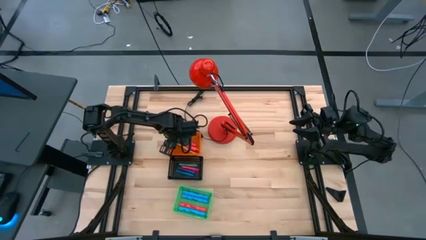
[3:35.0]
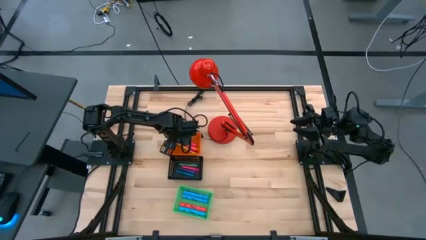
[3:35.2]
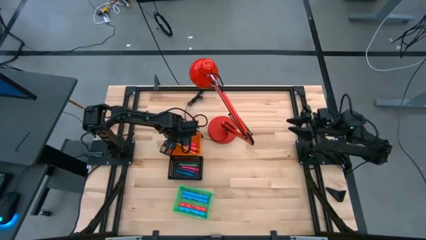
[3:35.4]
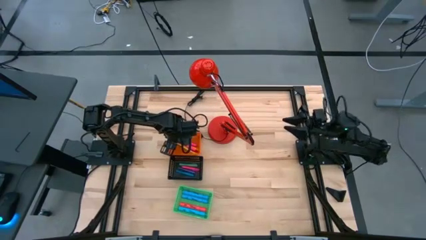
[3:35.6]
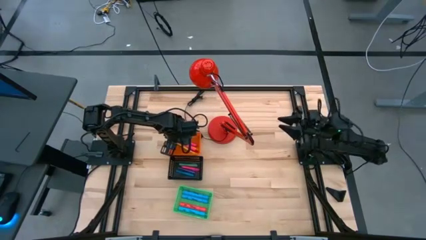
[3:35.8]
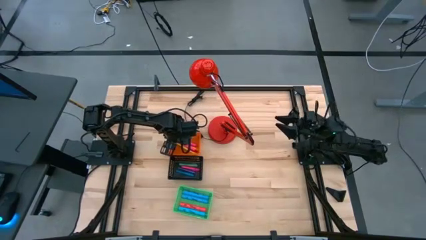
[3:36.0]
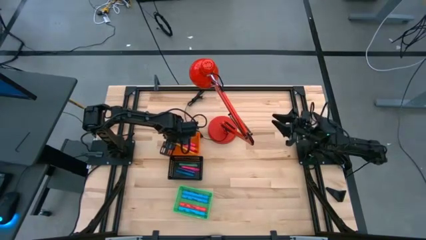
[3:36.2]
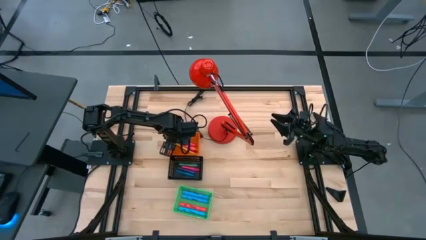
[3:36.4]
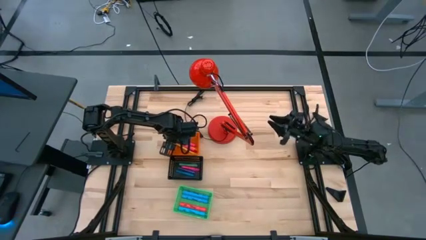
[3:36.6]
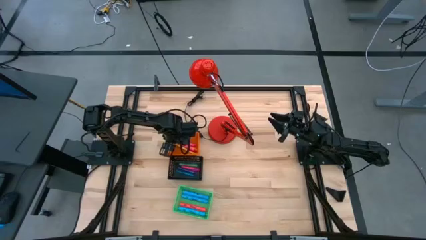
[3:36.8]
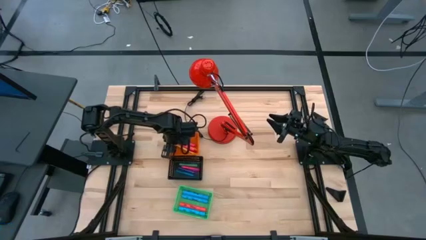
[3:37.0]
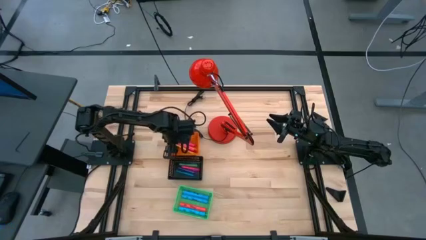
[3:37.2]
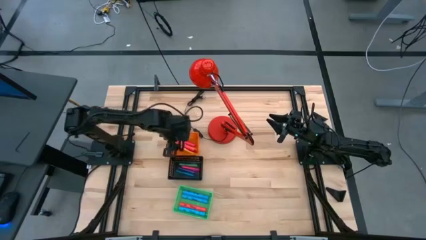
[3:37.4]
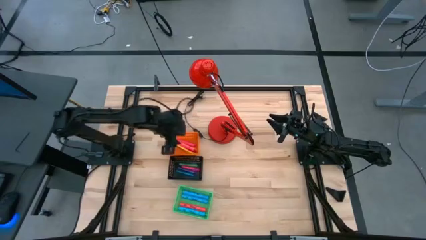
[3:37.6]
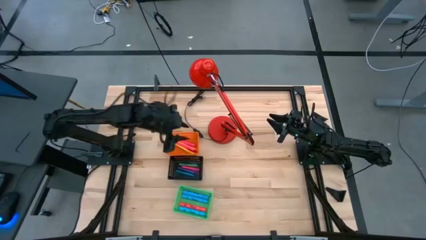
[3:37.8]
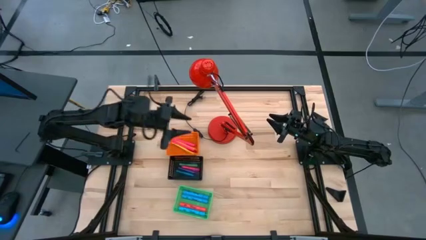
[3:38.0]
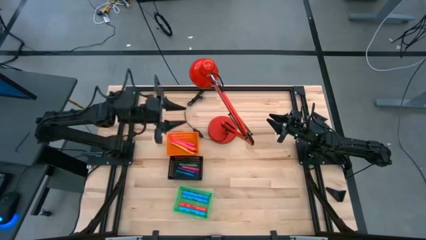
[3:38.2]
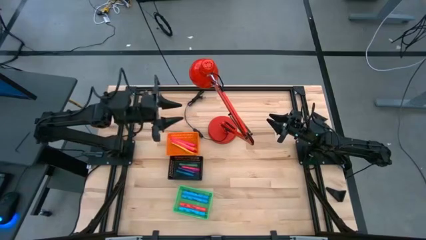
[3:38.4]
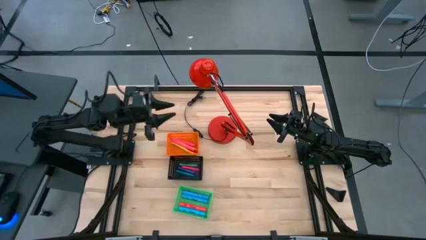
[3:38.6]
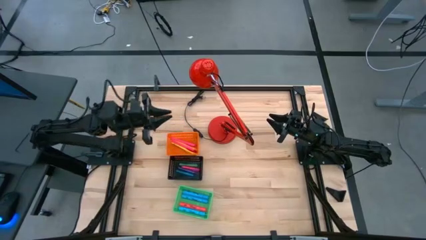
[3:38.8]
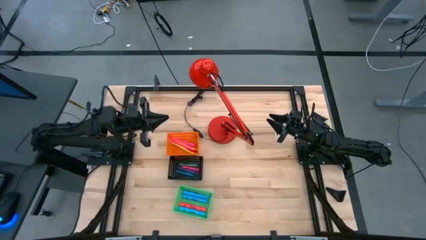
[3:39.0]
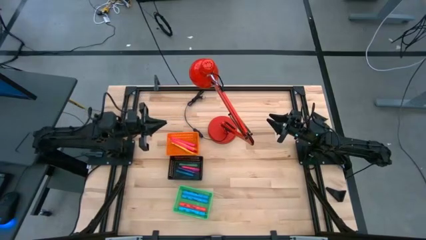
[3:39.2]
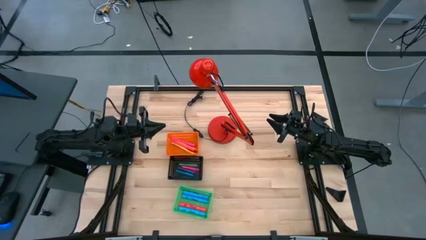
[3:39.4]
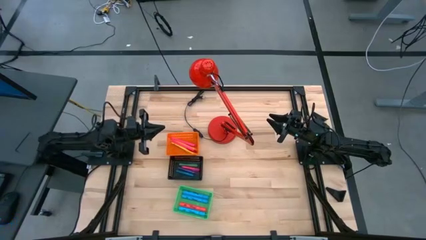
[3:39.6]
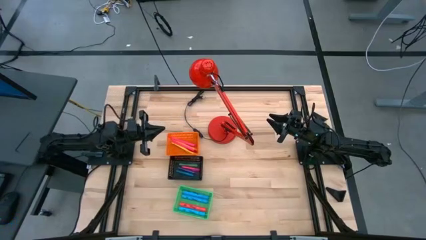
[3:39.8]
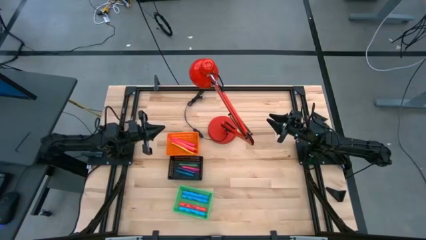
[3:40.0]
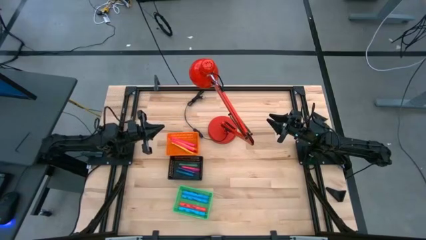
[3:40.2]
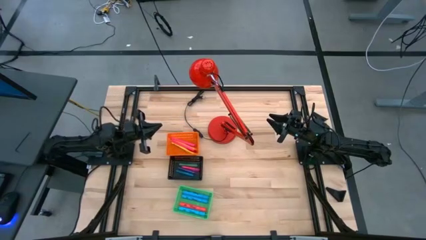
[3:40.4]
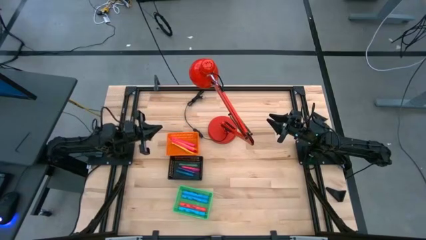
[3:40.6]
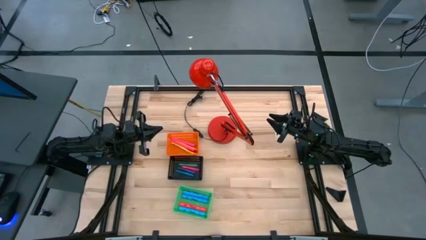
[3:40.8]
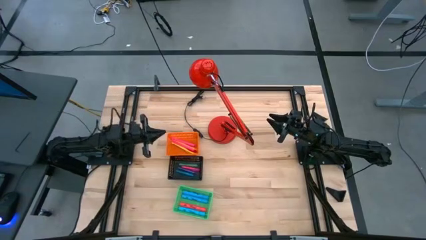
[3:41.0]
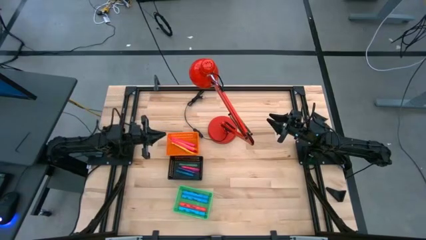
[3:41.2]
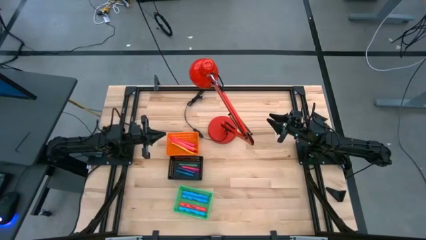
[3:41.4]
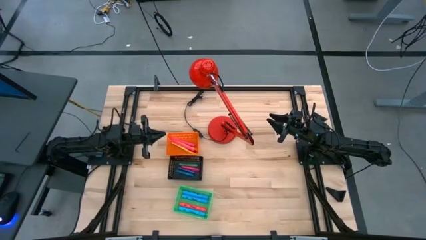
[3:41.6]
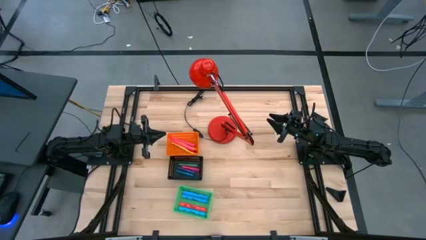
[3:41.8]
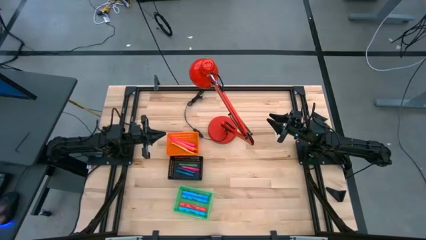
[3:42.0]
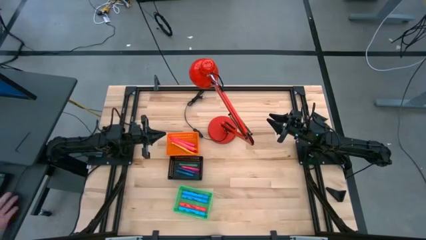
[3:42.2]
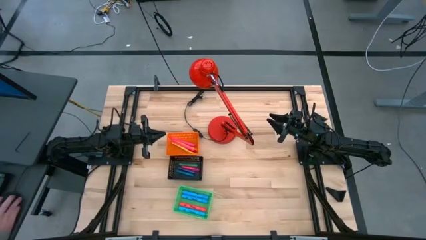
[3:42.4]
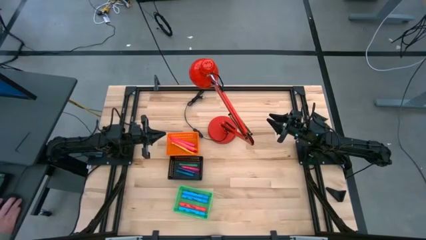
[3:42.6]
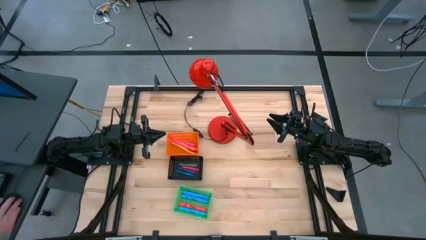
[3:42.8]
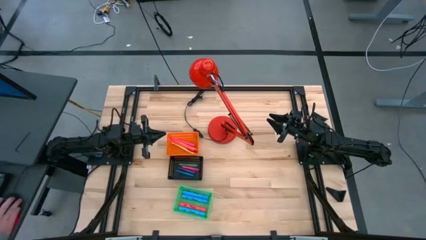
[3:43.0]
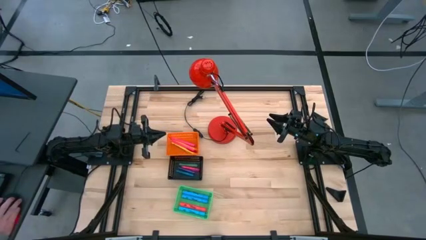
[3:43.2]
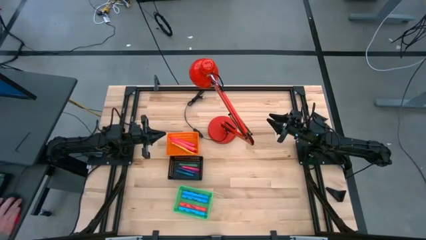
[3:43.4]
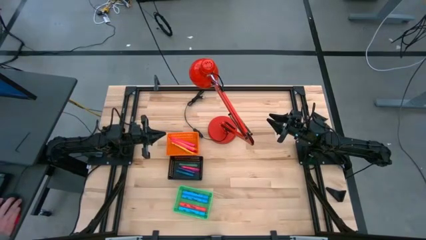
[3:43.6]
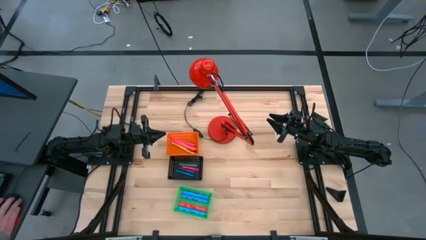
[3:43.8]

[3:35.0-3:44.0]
Task: Pick & Place Markers
Return to Home Position

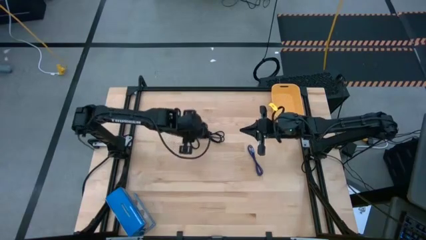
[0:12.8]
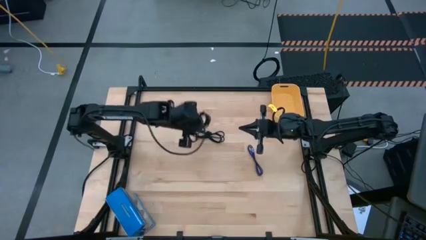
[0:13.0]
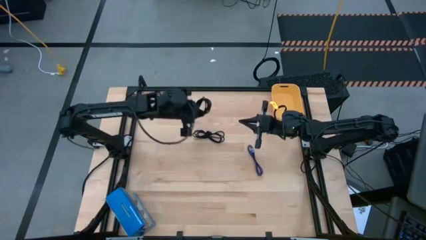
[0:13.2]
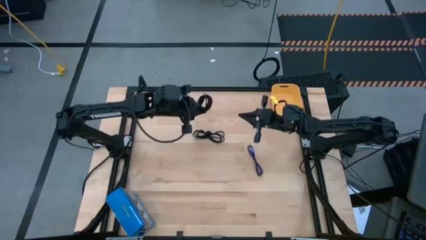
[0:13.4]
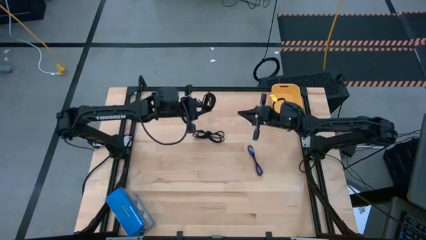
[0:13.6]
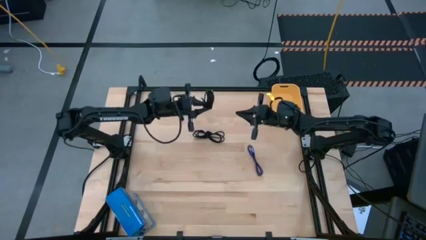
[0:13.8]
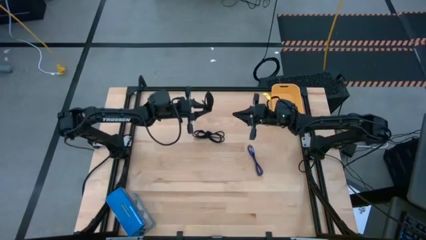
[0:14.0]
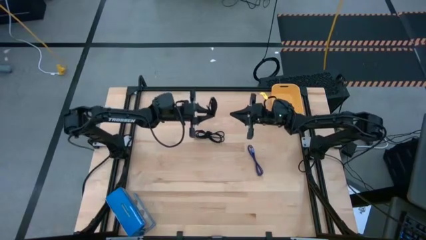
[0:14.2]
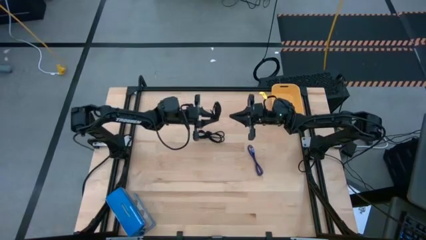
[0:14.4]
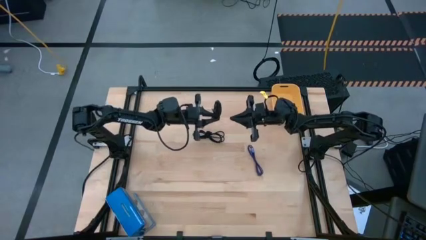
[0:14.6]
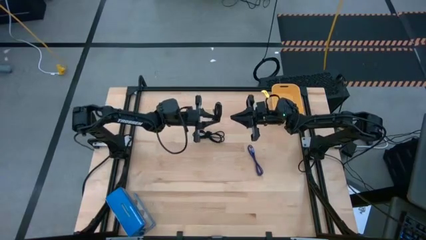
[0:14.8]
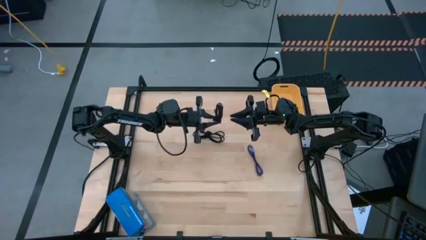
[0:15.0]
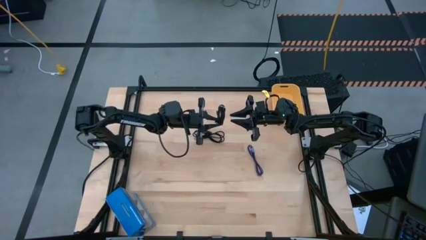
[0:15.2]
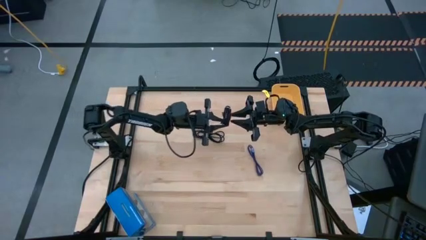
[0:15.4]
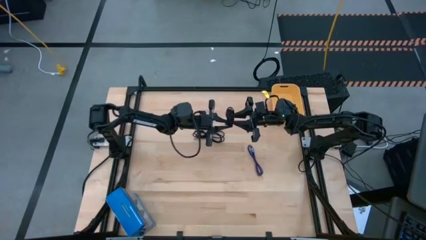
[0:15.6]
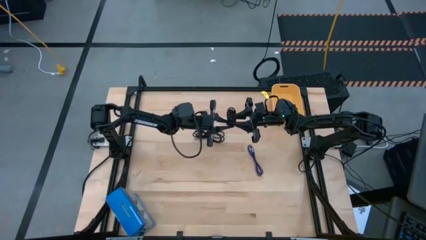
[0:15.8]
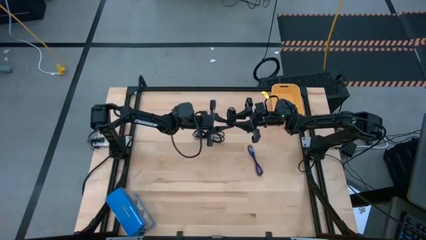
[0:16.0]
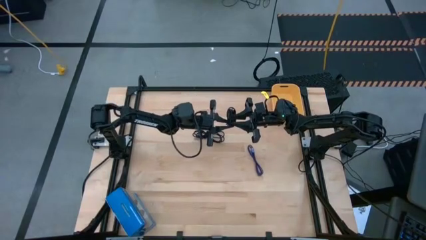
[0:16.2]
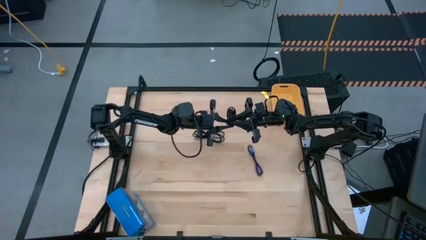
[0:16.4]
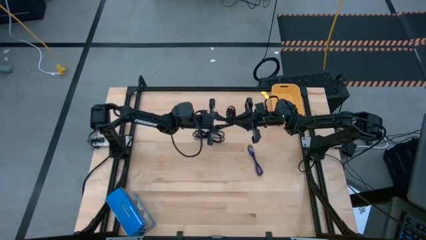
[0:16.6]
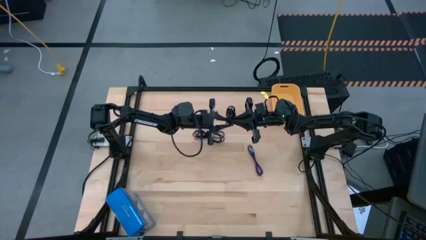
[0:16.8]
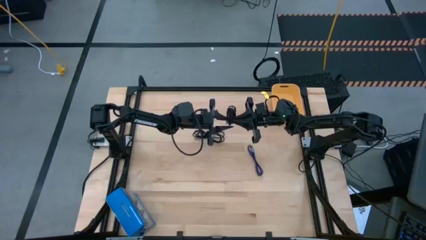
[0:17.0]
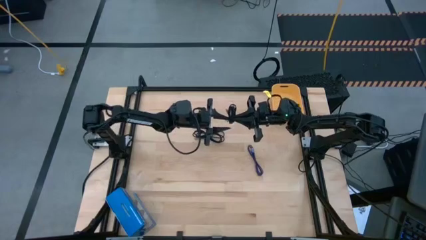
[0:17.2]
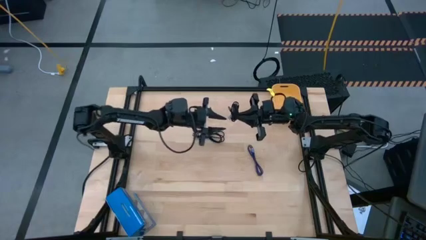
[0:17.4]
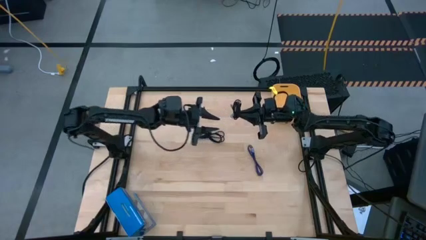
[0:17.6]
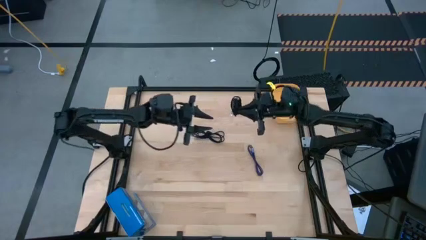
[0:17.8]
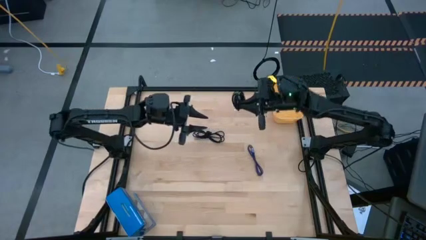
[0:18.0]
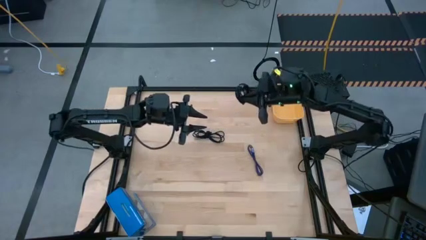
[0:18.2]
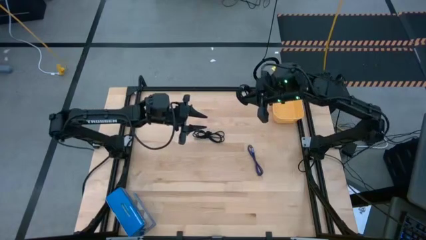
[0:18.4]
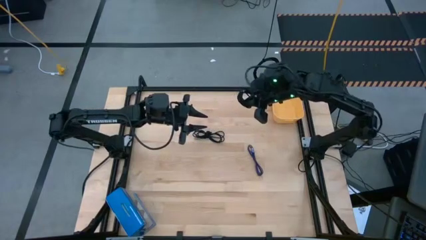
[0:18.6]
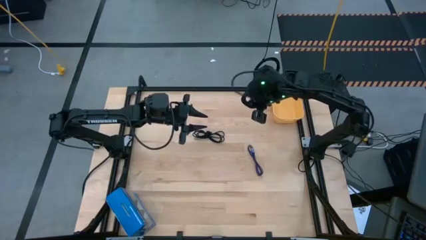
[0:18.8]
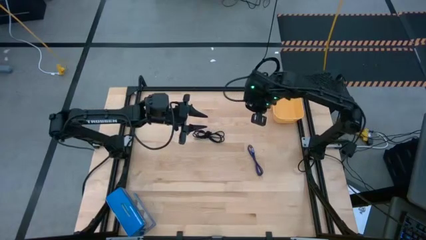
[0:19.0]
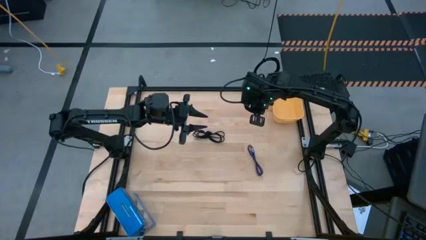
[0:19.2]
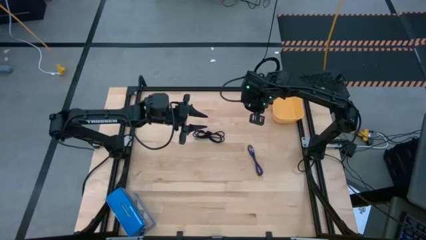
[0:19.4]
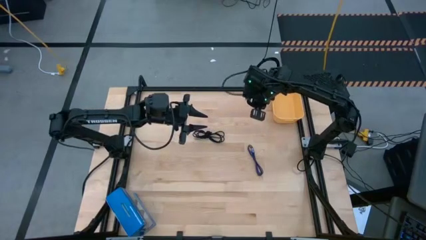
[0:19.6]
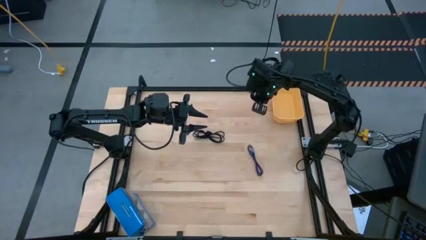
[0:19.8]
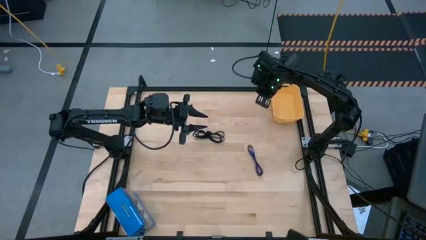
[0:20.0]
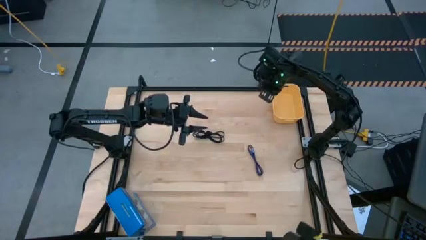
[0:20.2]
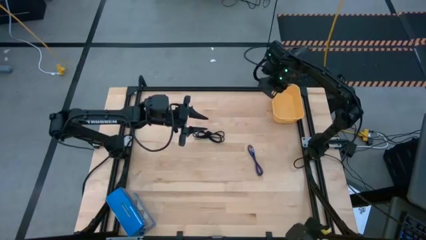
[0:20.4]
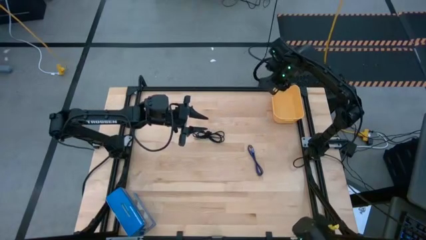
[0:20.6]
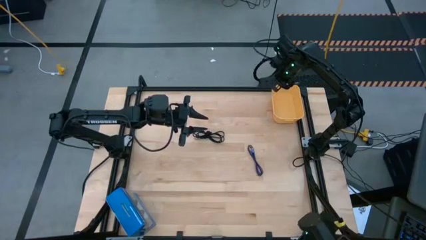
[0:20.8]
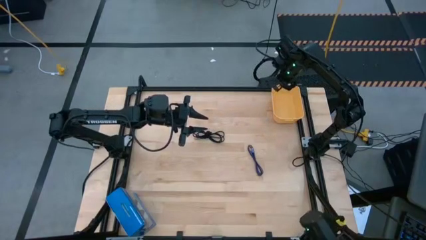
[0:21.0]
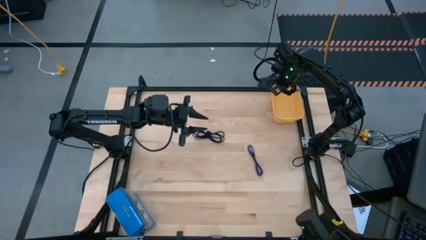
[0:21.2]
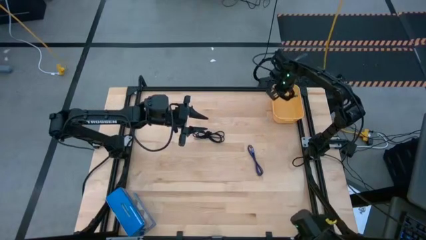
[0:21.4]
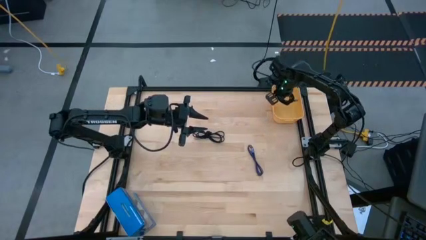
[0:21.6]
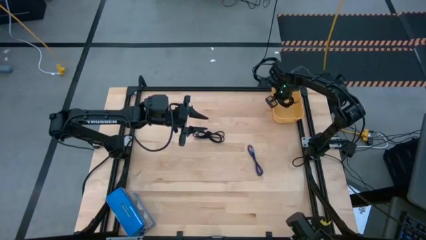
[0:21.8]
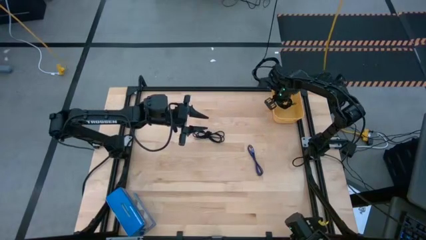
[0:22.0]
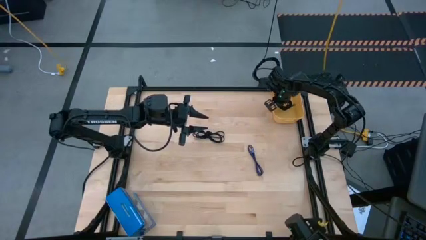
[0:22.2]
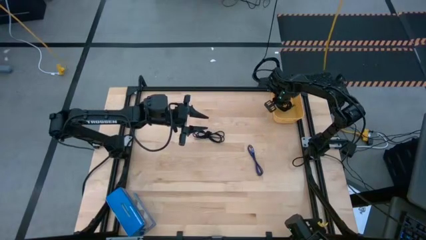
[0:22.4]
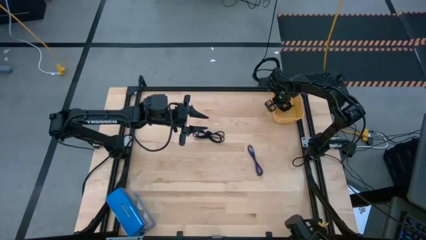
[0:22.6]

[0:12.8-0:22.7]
Task: Pick and place USB-C Cables
Put the left black charger cable into the yellow bin
